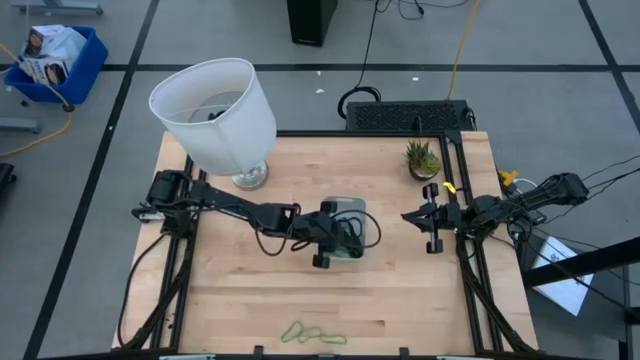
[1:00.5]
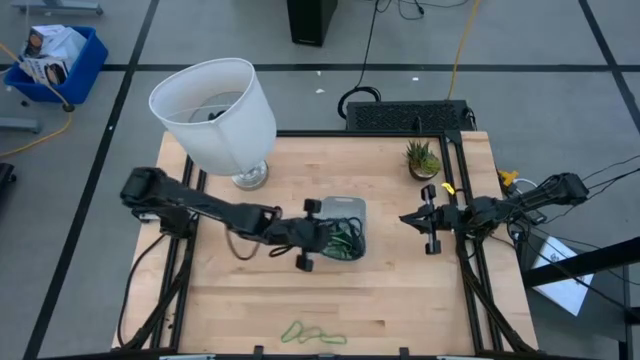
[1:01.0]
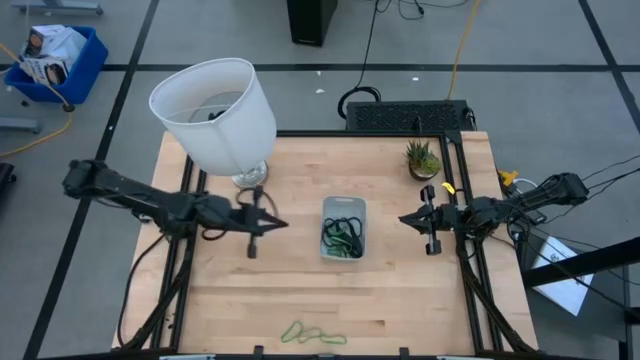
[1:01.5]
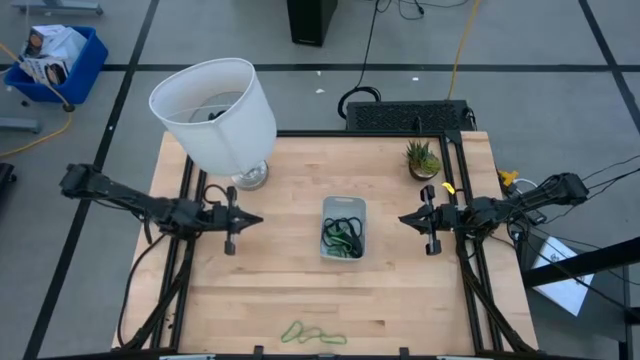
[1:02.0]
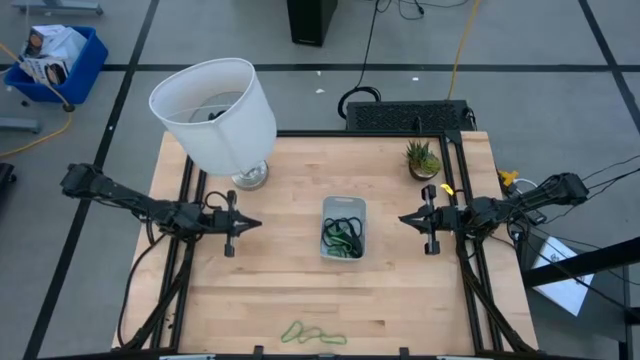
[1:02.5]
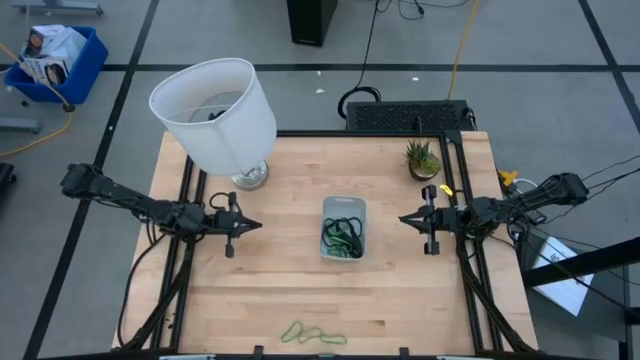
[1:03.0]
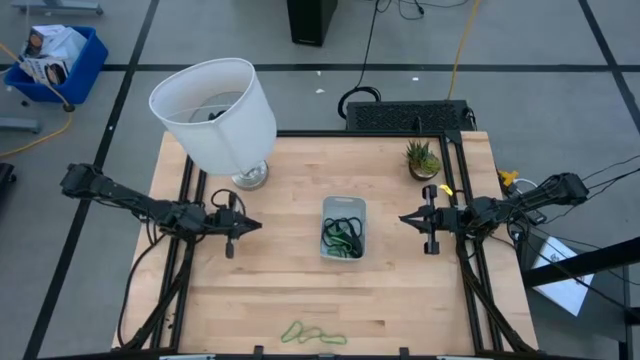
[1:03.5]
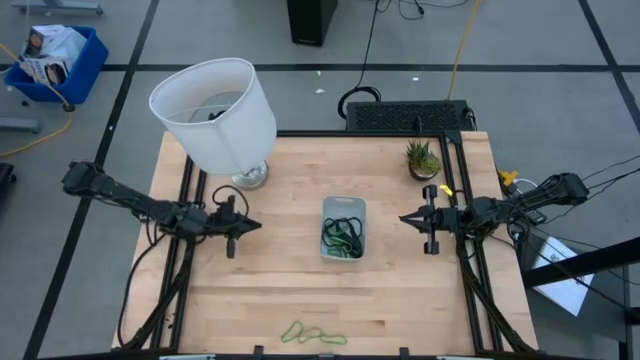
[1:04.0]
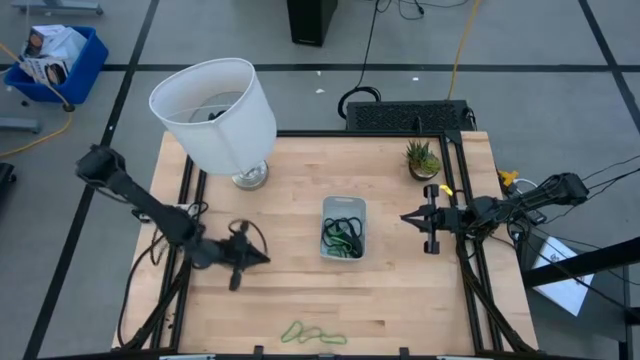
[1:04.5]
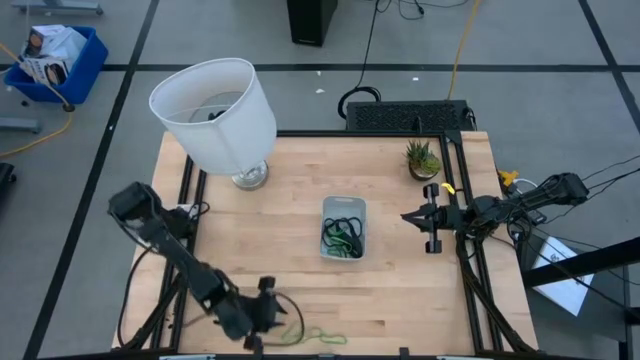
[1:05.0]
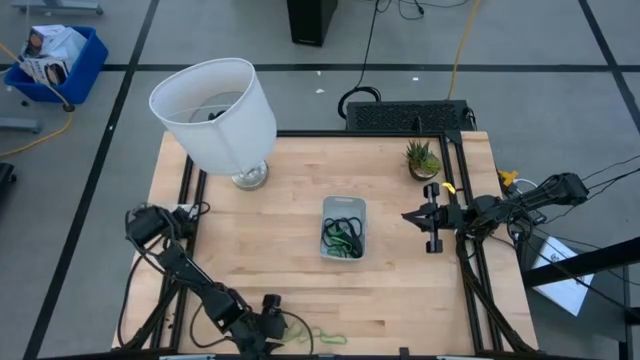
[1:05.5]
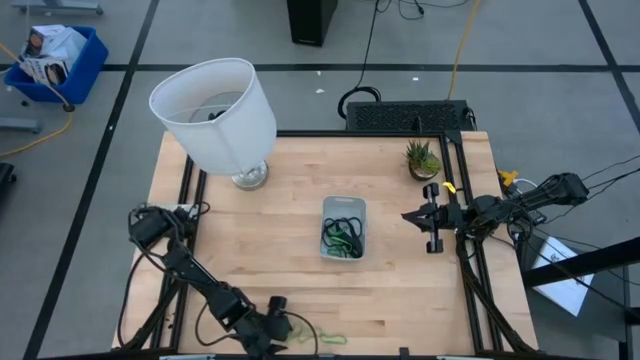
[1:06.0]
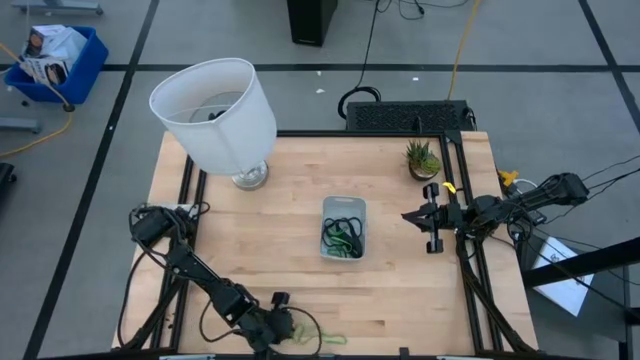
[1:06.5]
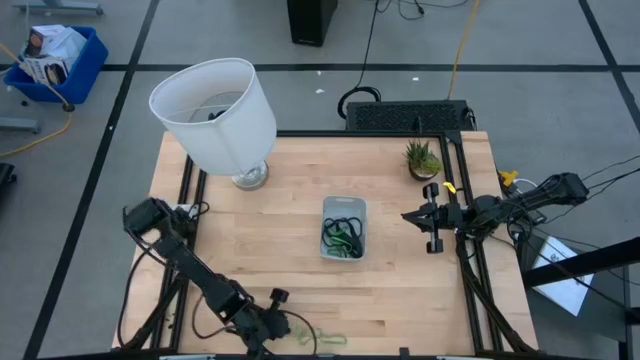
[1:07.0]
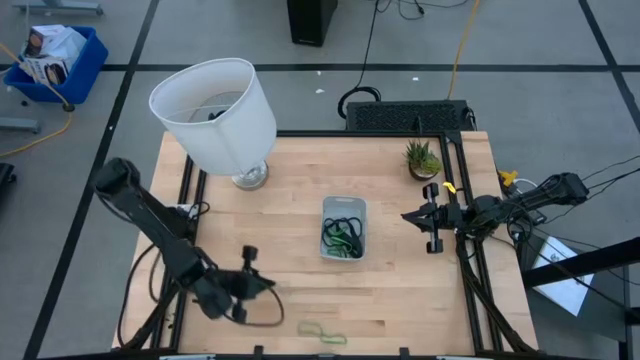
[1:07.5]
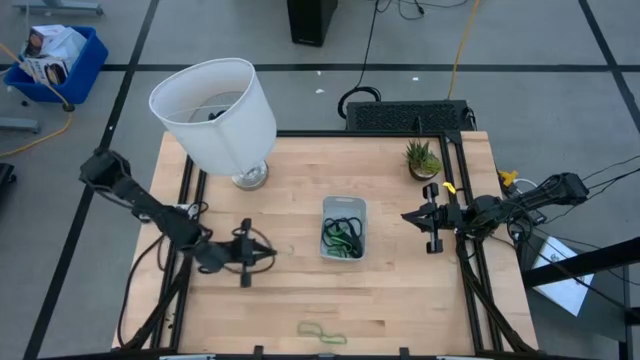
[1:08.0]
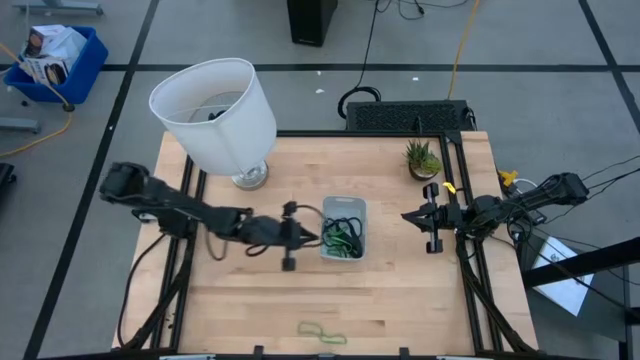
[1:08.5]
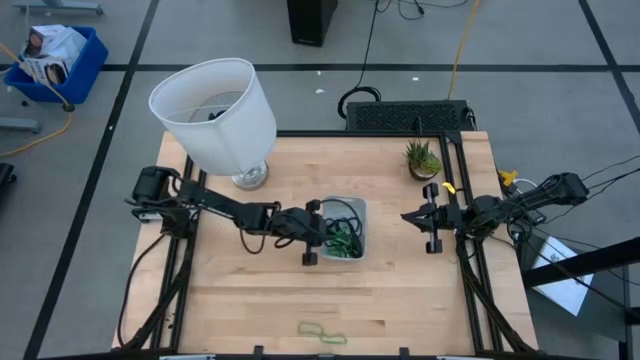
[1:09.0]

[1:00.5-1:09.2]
Task: Pick and place rubber bands into bin
Put the green rubber band into the gray container

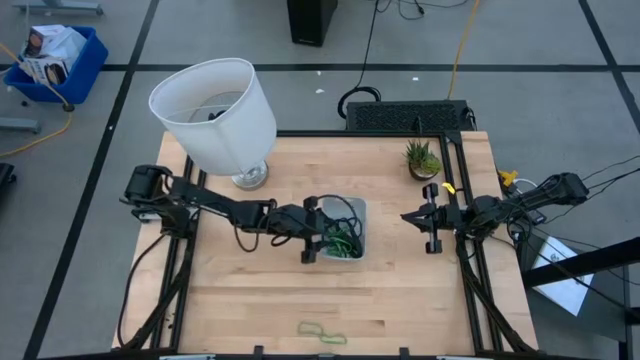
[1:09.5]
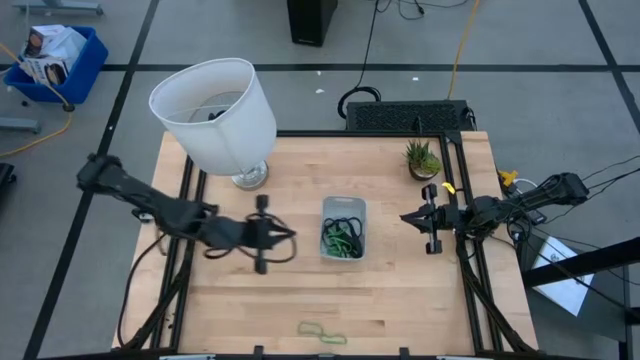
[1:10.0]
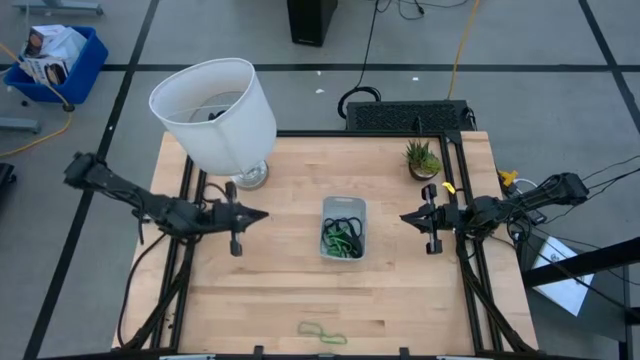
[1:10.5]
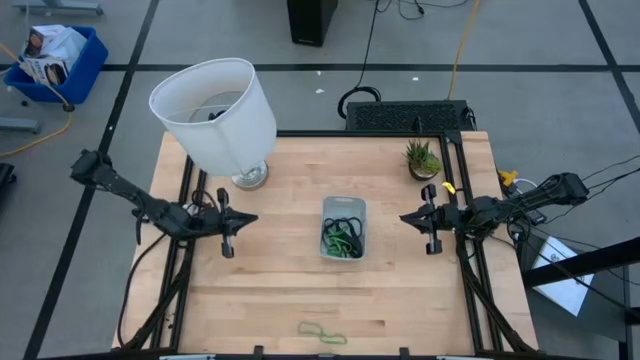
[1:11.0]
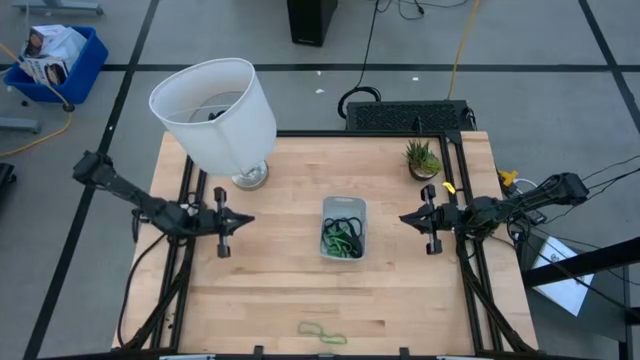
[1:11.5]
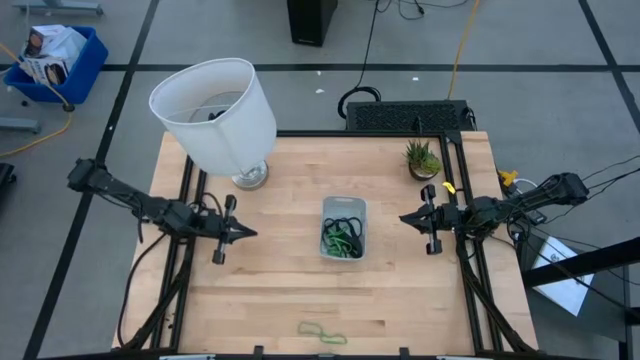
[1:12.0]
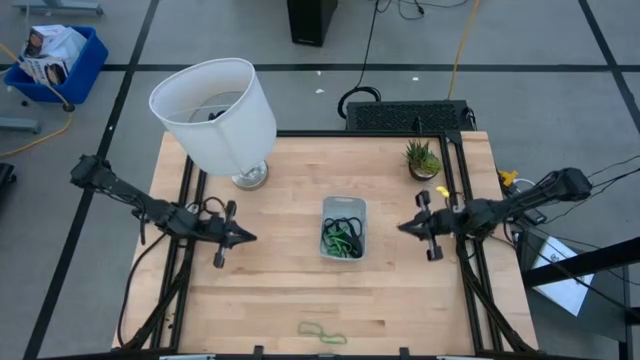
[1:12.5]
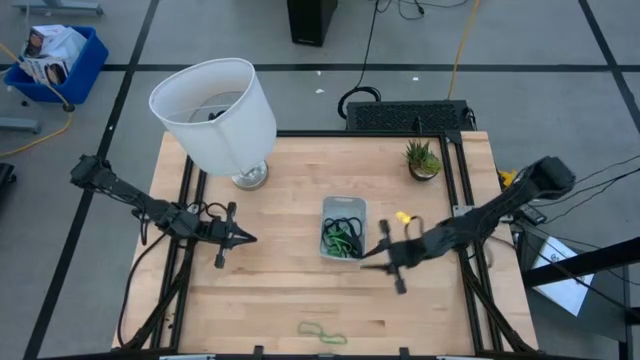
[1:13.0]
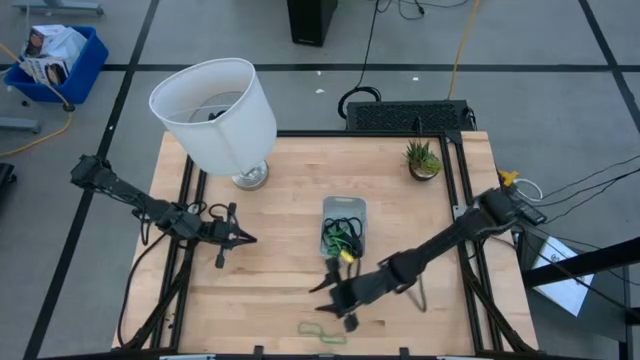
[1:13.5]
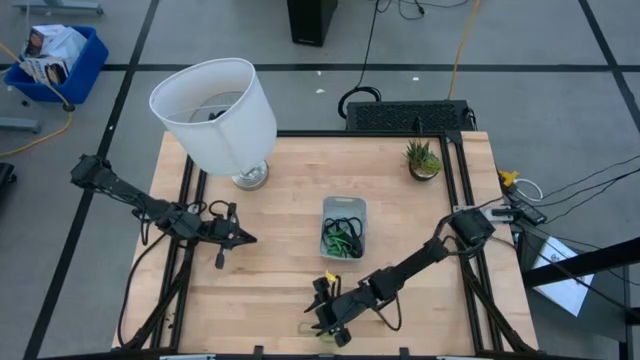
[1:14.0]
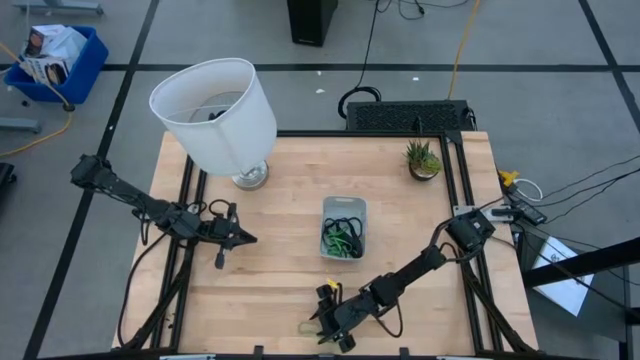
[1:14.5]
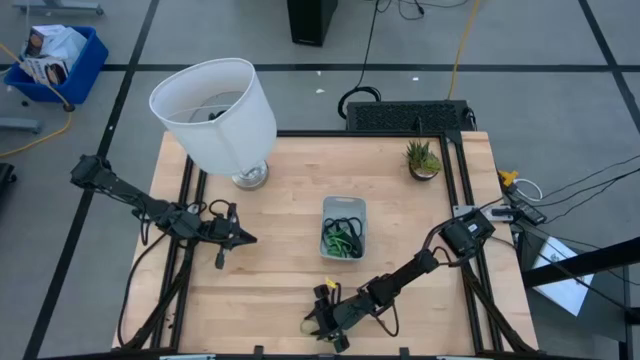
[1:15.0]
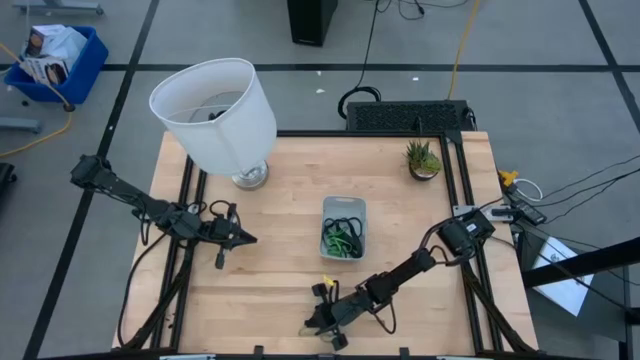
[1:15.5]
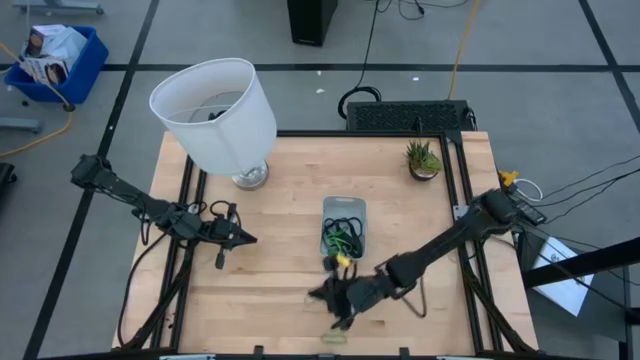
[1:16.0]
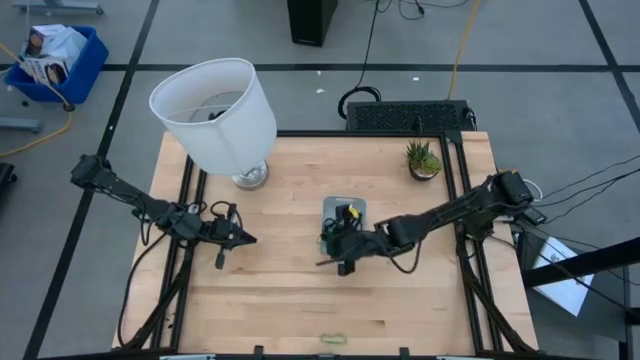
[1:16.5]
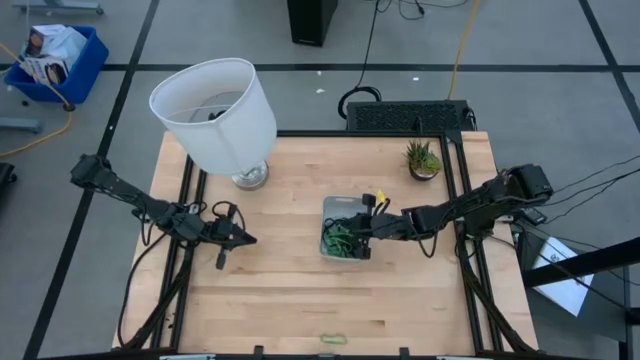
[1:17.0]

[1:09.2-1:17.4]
Put the green rubber band into the gray container

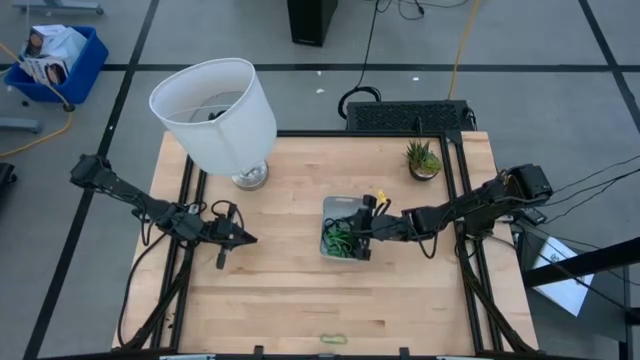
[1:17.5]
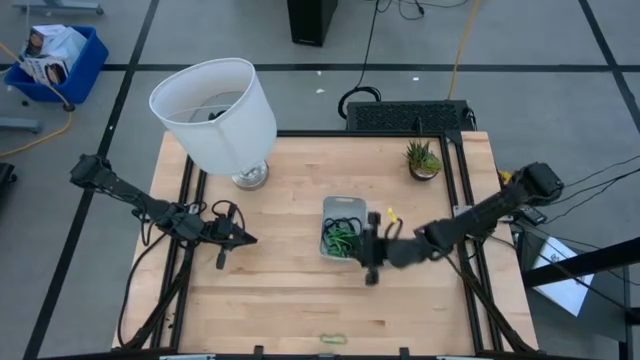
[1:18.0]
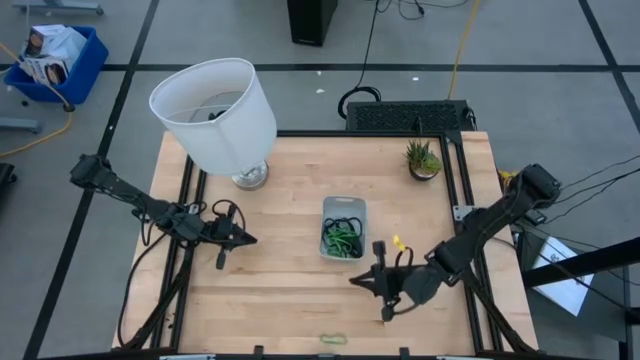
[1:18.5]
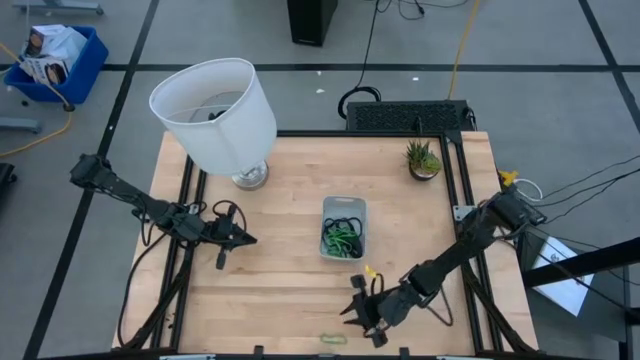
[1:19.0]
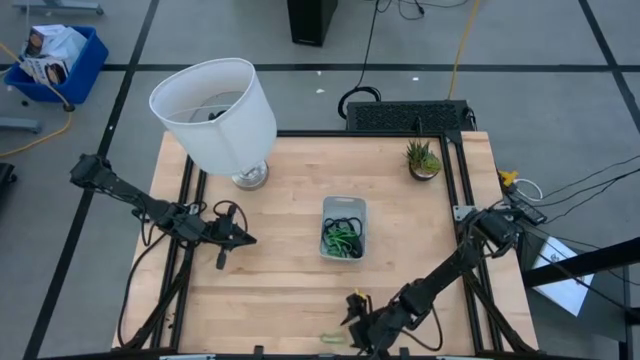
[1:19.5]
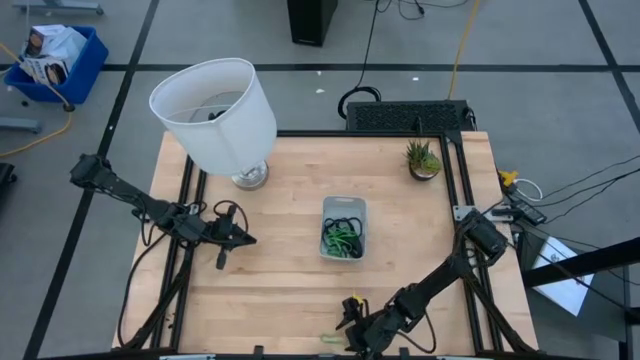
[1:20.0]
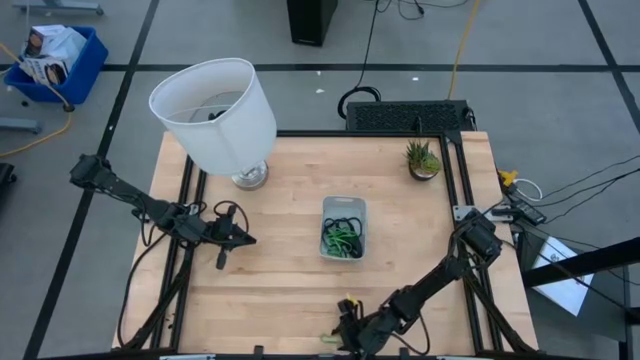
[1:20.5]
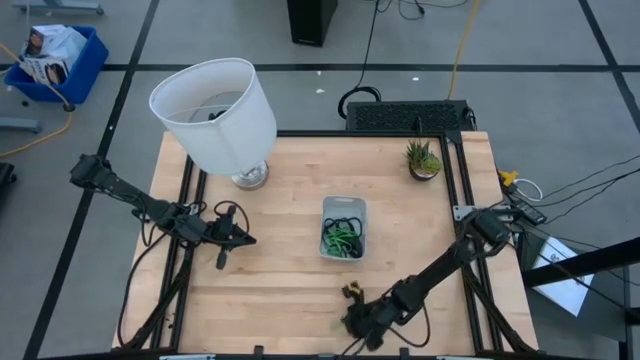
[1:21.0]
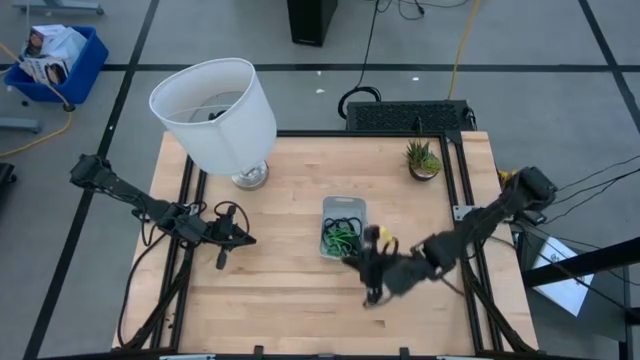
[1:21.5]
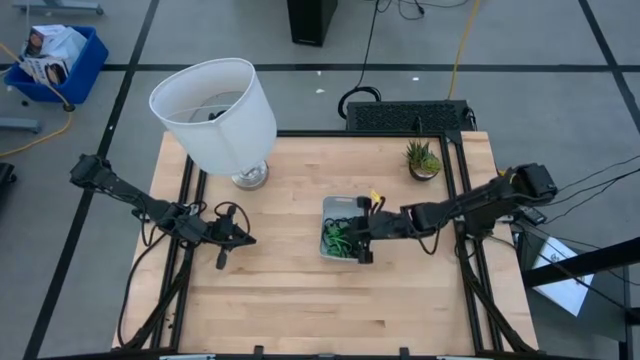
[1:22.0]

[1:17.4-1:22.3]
Put the green rubber band into the gray container
